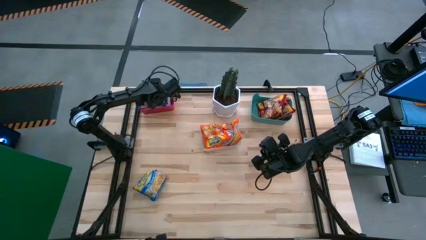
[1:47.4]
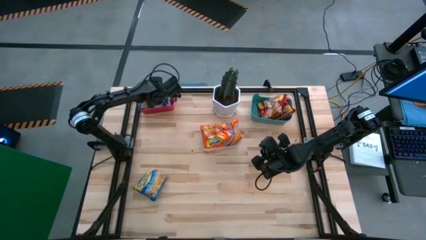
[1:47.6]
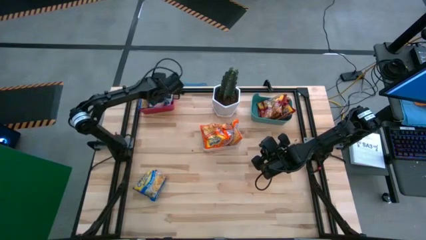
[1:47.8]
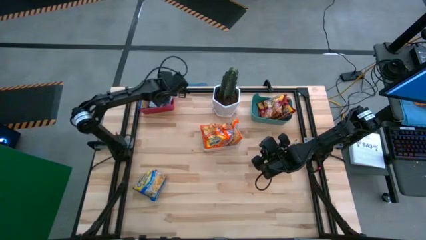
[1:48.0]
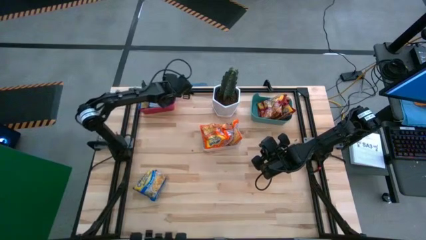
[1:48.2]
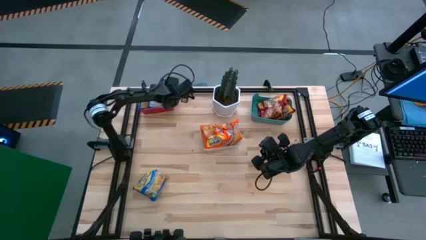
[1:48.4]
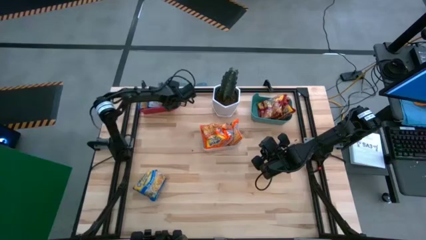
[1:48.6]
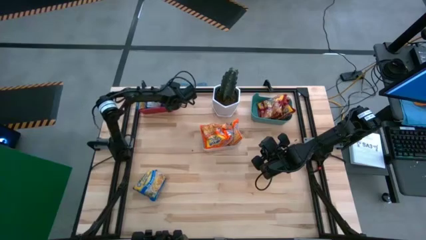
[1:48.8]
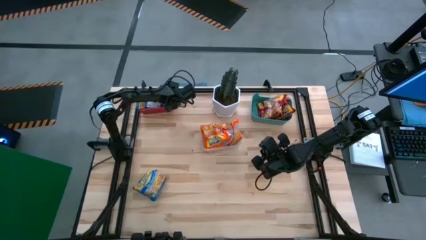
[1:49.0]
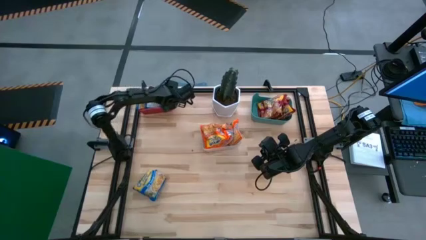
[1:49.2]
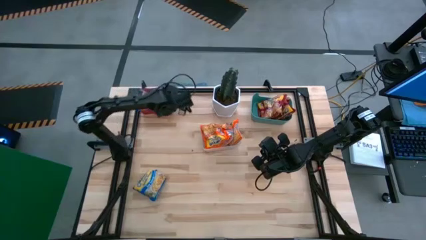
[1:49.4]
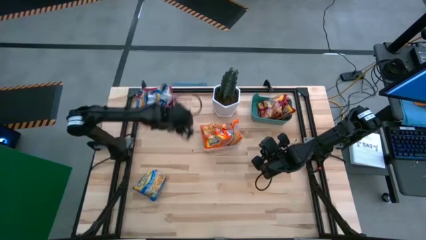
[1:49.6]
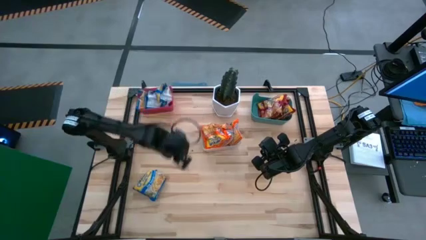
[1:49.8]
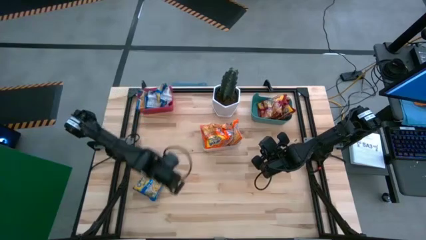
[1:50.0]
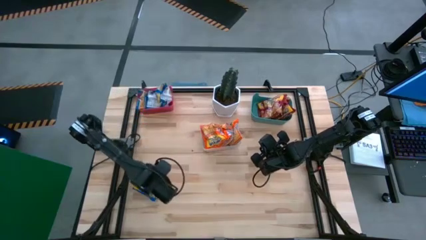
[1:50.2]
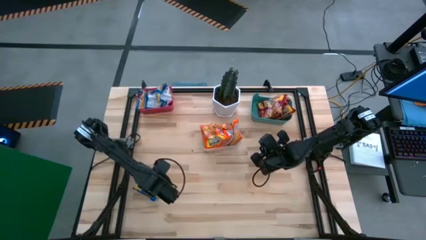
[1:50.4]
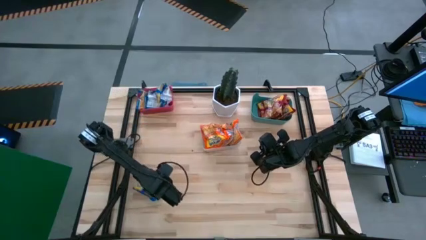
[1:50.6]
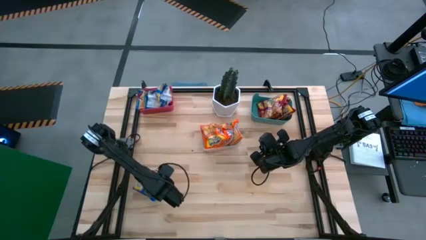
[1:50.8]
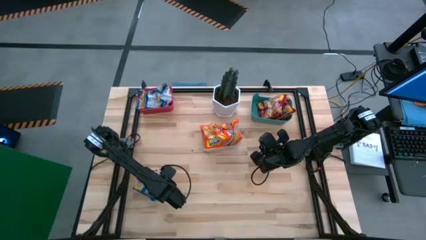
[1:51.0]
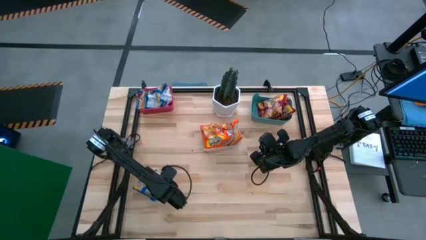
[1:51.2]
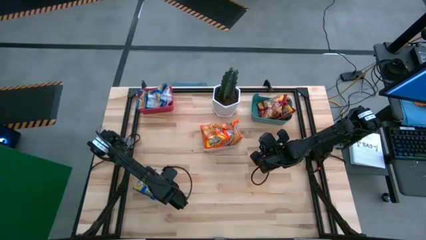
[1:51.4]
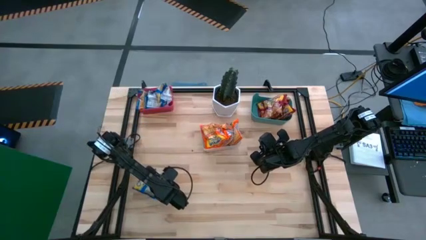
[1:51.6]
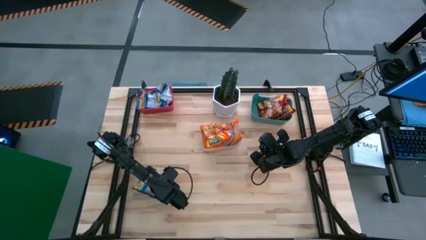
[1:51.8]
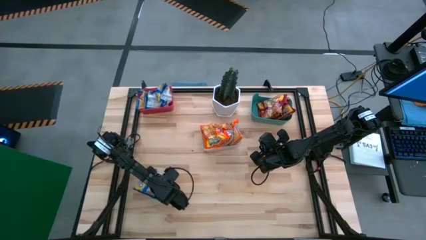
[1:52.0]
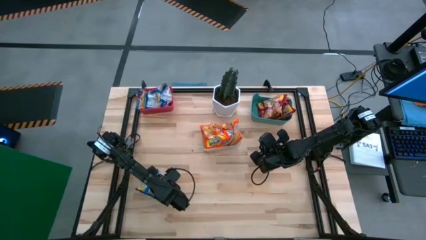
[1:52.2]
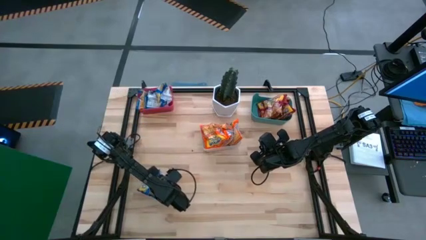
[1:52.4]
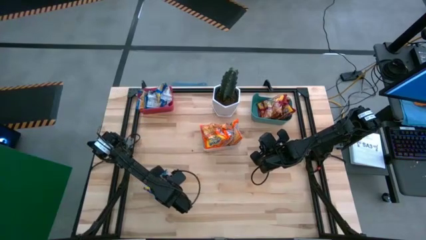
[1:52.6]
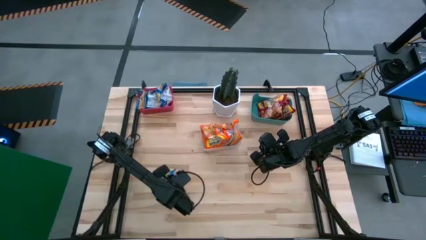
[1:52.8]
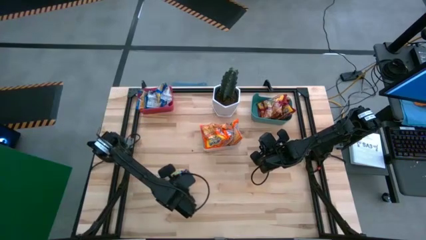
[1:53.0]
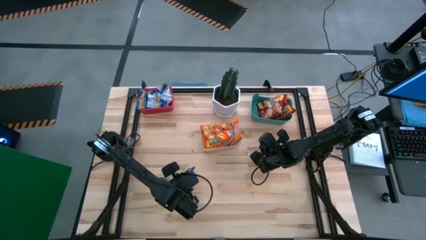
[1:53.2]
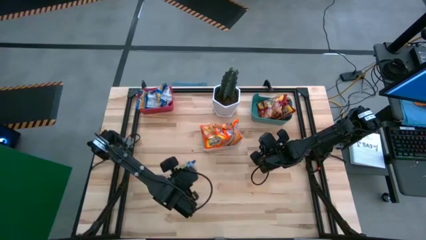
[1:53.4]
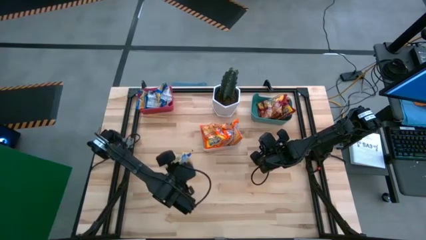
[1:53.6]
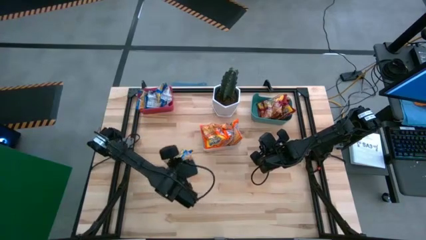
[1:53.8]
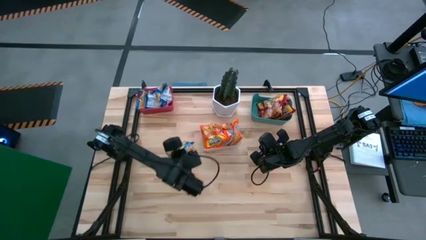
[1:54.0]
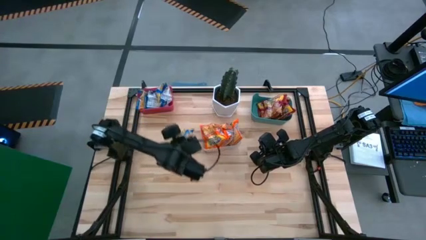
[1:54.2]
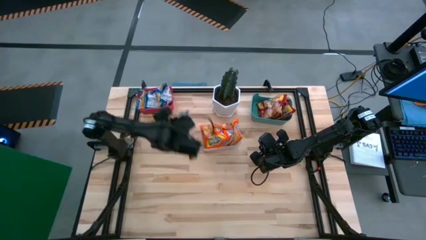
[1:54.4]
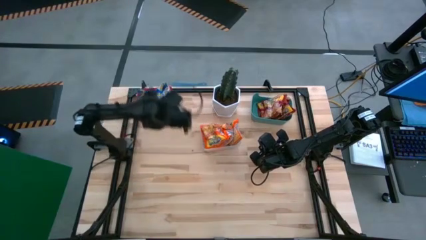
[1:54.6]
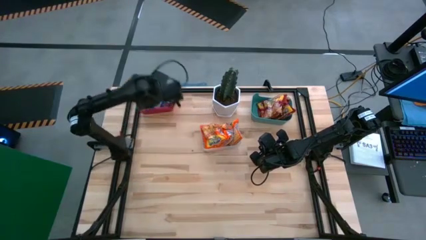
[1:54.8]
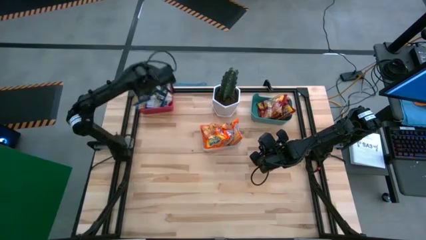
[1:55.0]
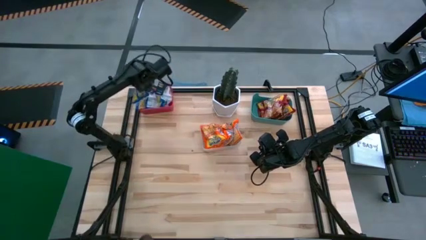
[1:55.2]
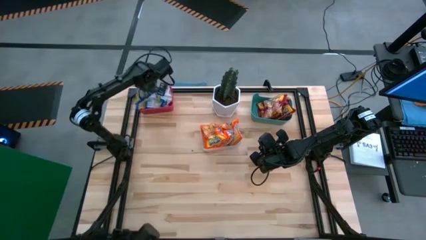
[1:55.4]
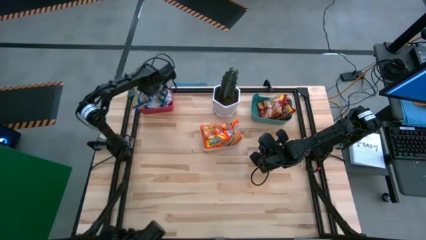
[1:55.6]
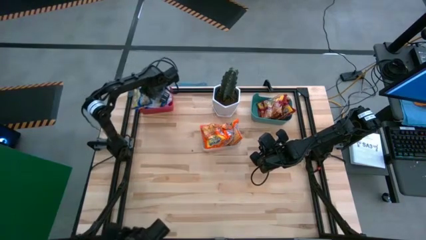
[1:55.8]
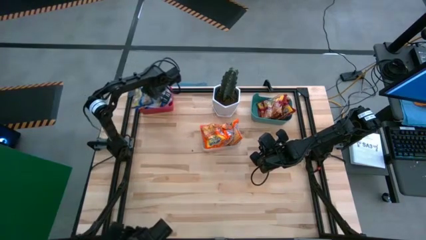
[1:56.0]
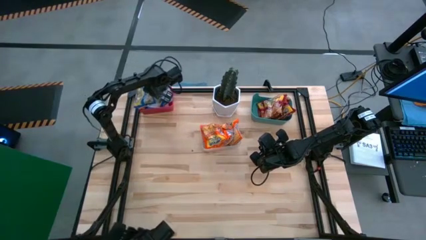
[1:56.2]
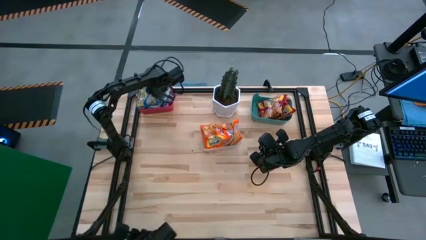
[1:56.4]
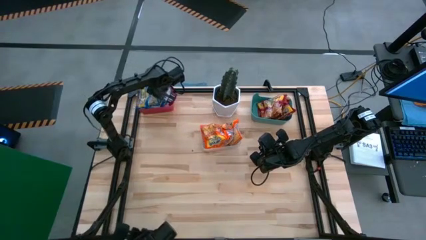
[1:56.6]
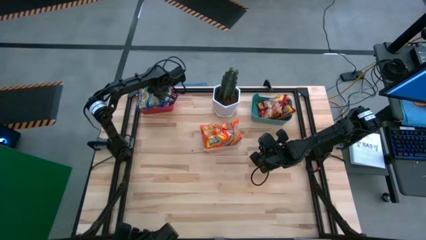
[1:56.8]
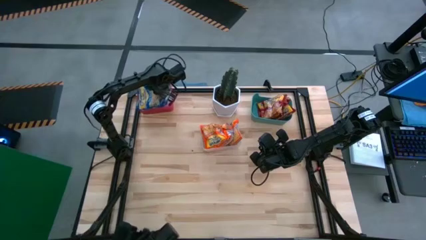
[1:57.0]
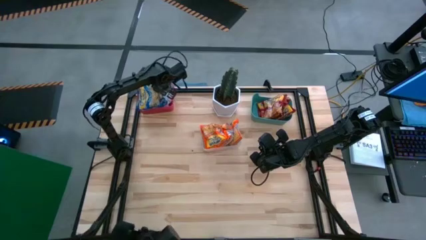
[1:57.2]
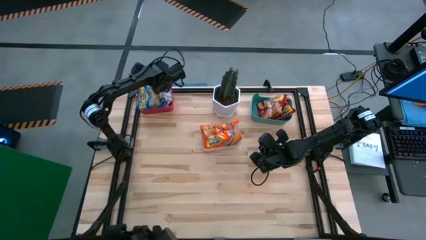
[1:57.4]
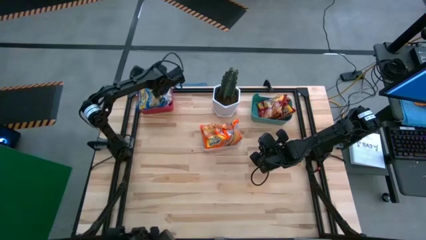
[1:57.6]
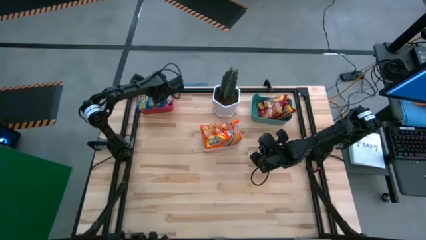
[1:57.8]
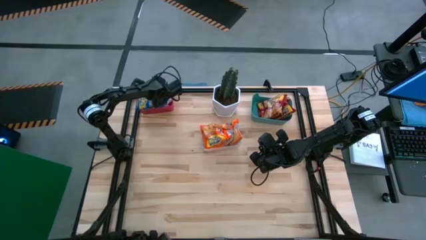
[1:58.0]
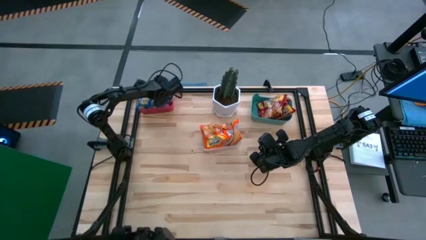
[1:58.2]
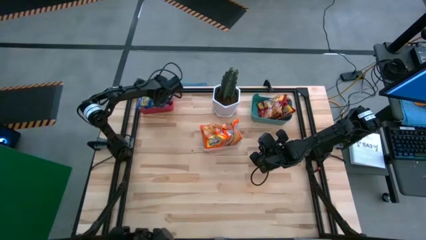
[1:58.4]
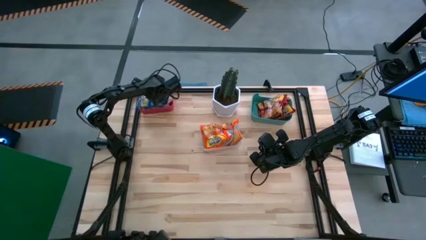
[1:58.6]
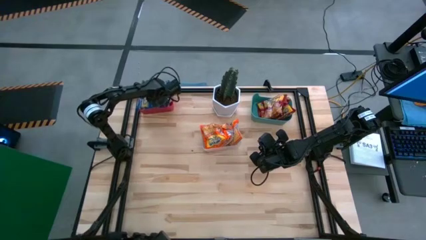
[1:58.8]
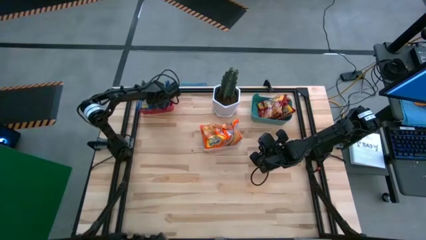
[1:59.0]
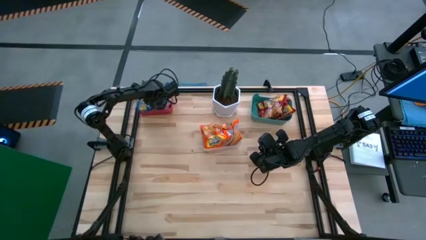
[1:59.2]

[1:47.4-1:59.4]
Task: Sort Maruchan noodles
Put the blue noodle pack into the red bin

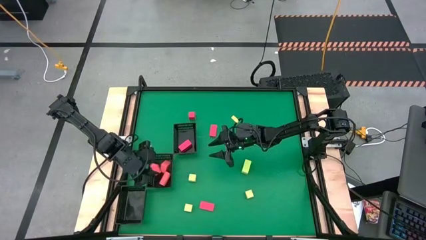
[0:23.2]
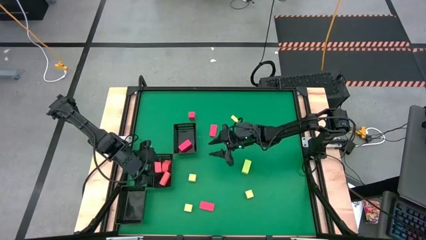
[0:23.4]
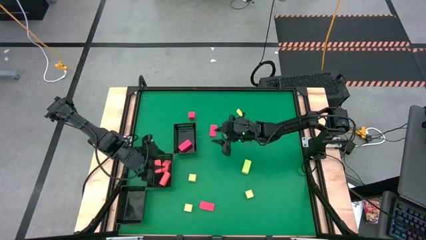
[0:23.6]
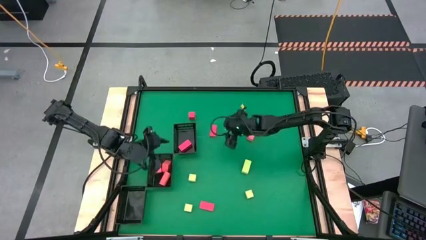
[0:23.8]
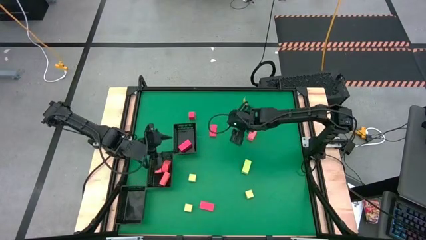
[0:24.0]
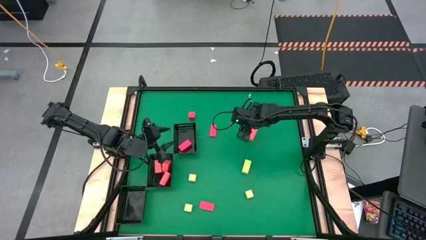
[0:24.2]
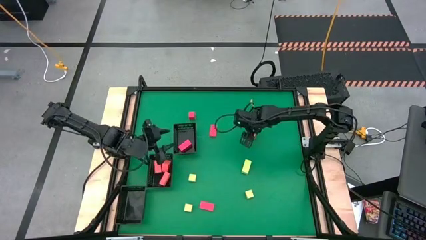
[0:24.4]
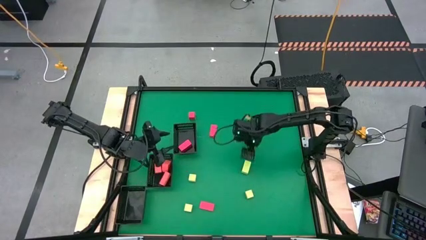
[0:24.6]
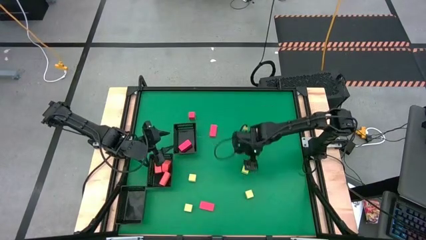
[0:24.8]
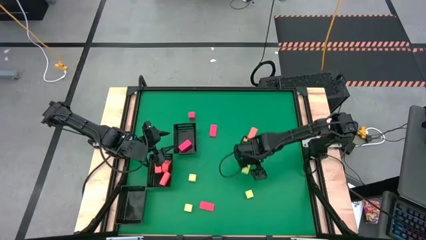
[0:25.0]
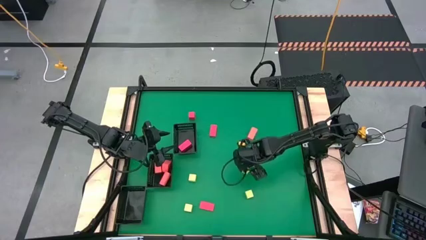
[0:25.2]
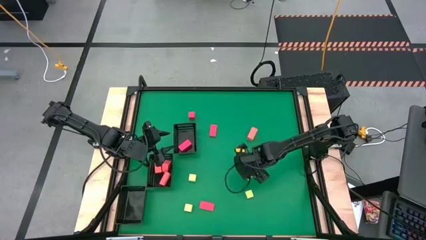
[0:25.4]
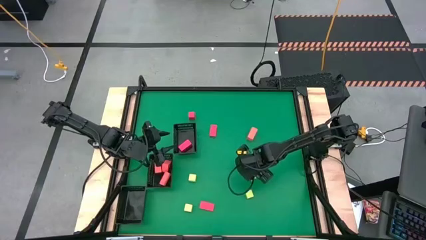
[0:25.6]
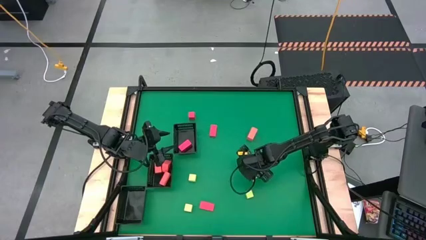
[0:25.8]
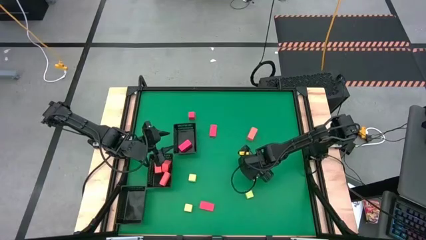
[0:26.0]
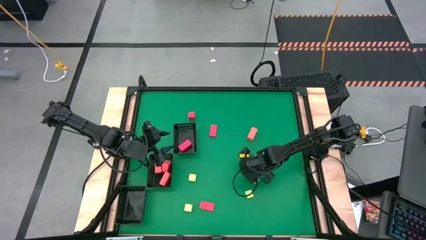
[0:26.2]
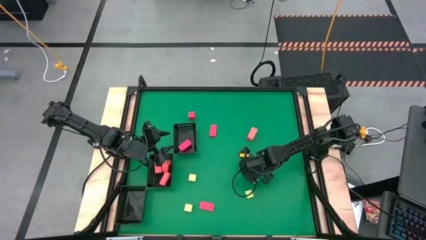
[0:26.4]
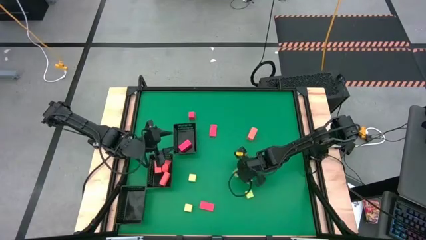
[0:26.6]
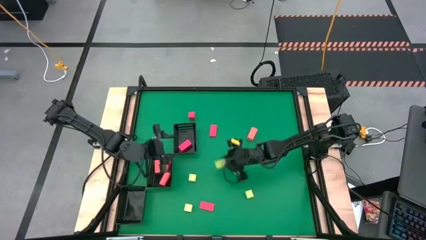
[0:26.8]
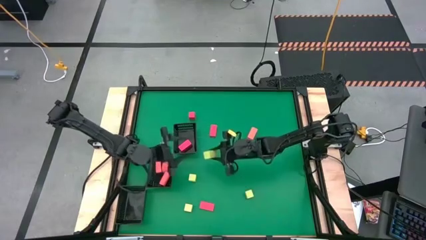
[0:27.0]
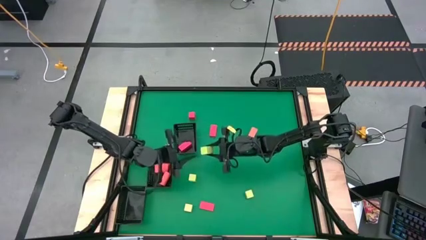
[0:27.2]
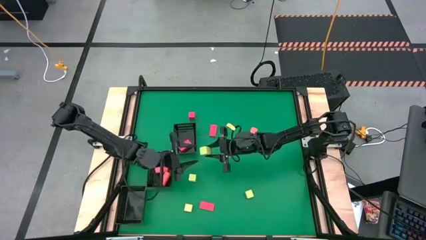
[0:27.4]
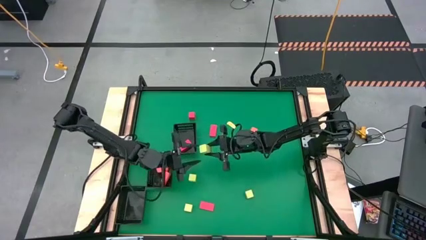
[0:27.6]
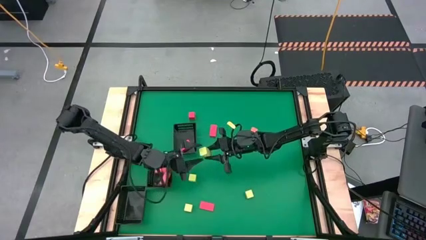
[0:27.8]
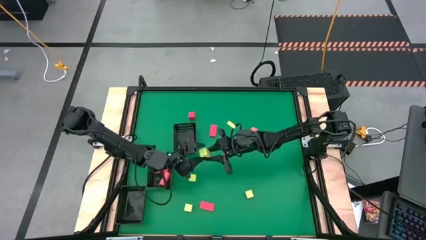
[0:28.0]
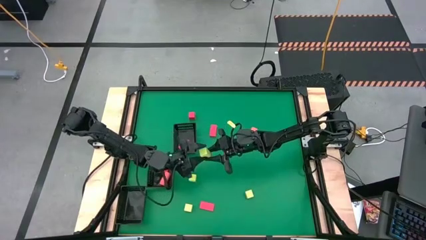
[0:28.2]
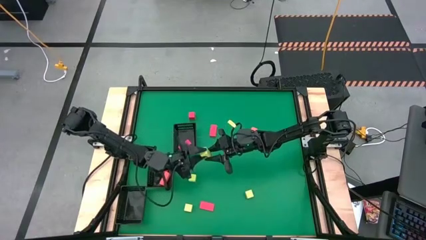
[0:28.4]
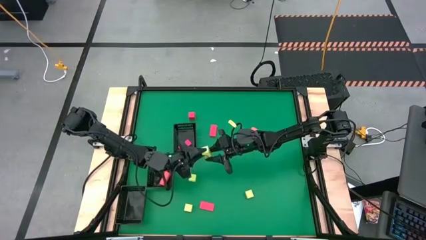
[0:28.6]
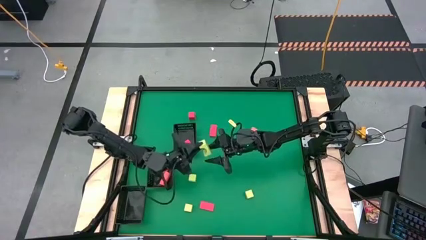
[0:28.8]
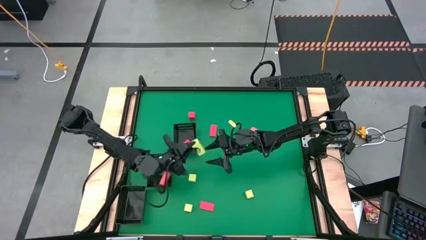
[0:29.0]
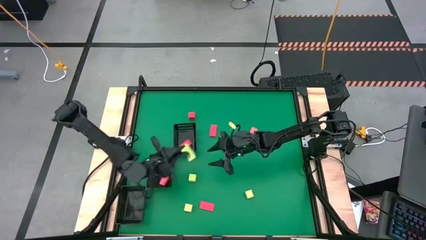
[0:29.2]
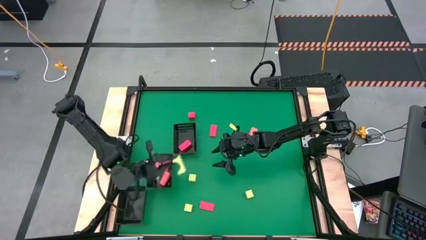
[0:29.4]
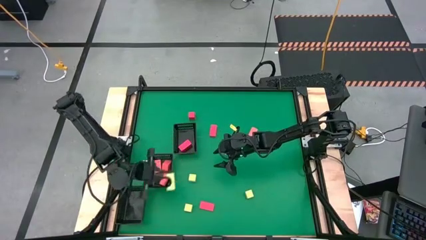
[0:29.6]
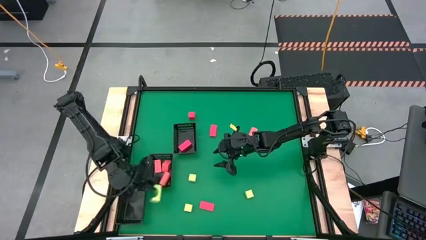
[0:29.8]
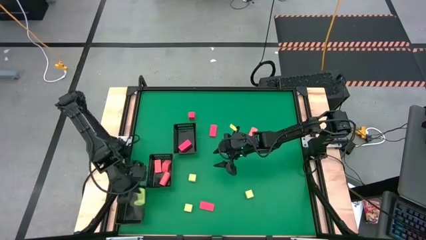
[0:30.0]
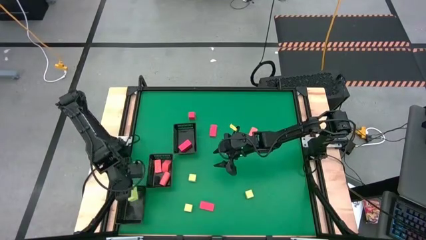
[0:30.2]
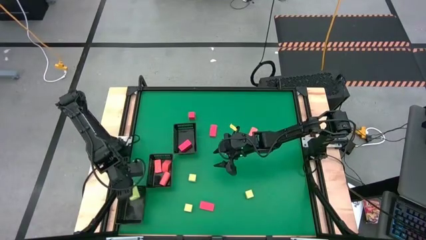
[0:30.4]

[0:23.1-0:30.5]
Task: Sort & place blocks by color
Put the green block into the bottom black bin
